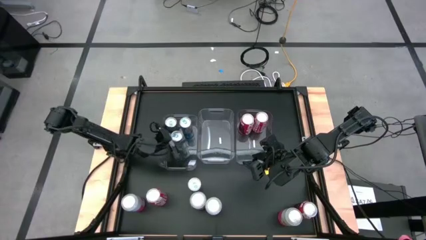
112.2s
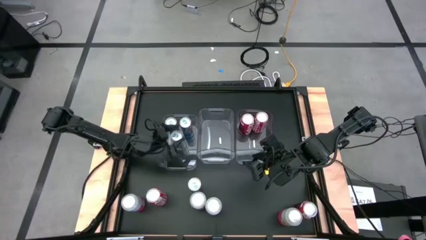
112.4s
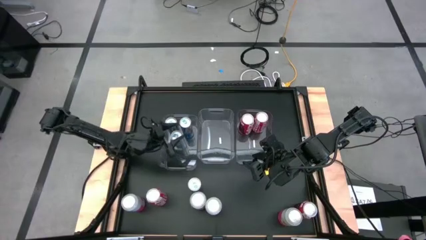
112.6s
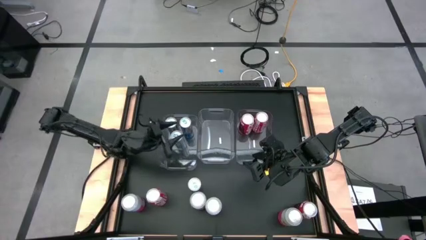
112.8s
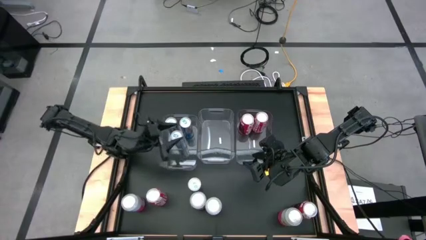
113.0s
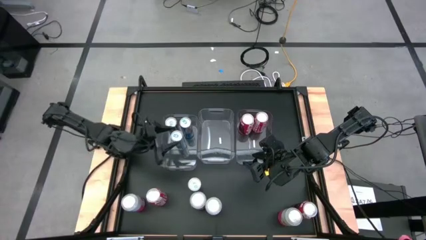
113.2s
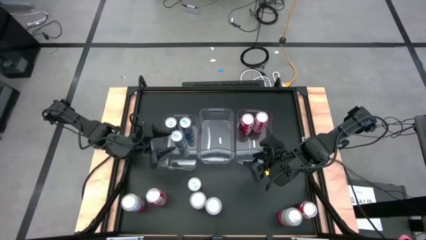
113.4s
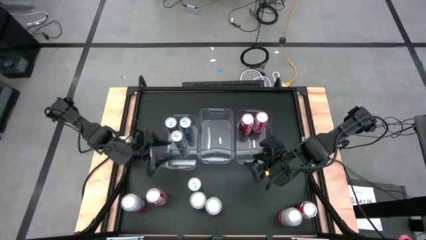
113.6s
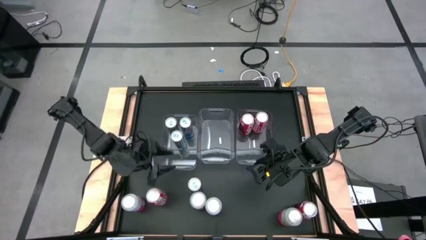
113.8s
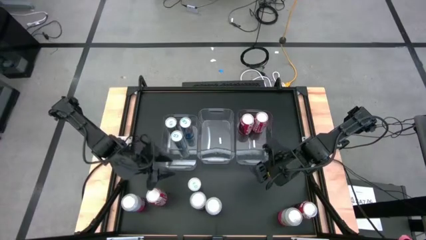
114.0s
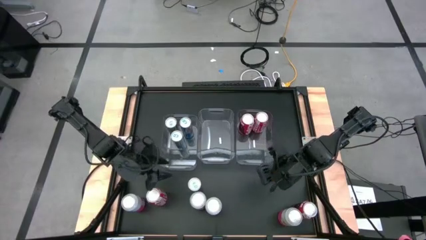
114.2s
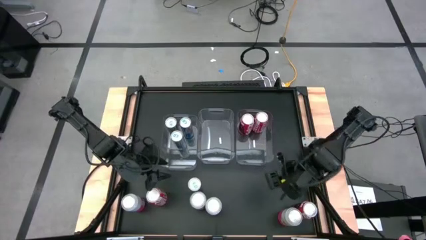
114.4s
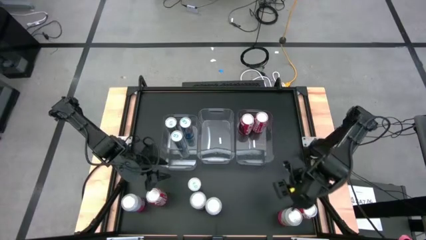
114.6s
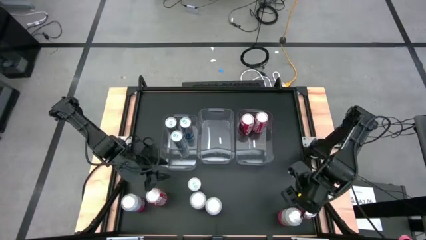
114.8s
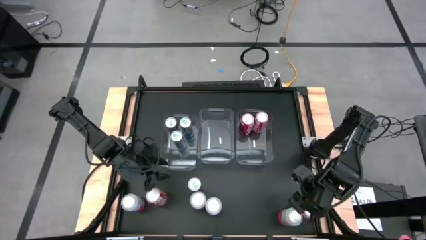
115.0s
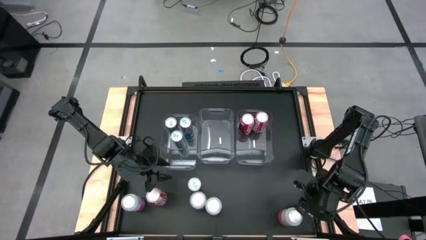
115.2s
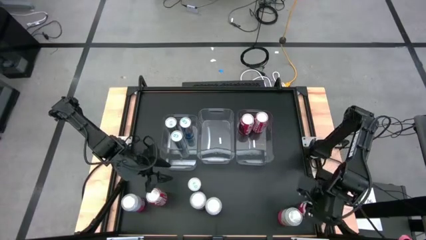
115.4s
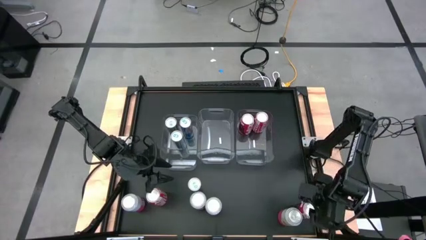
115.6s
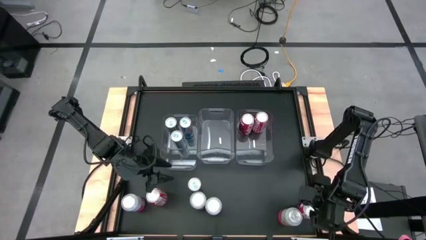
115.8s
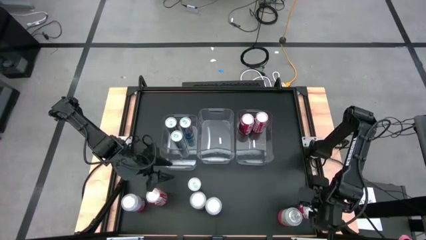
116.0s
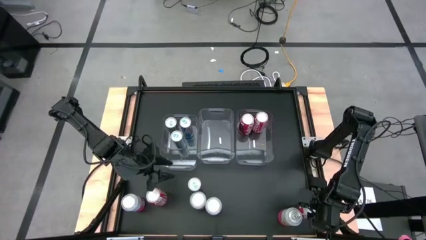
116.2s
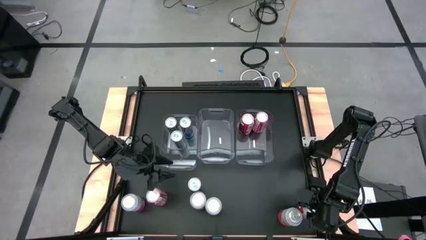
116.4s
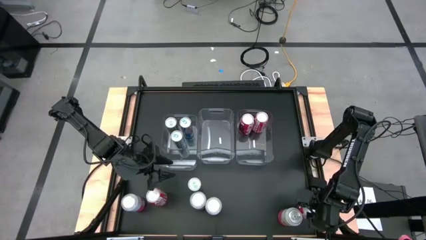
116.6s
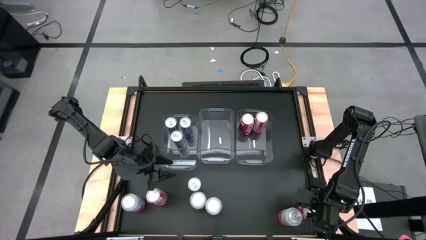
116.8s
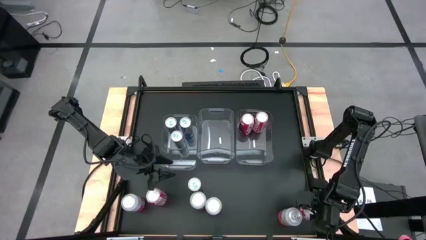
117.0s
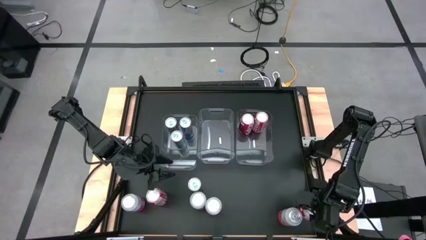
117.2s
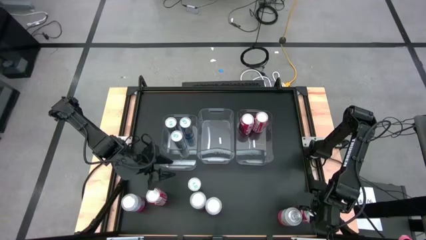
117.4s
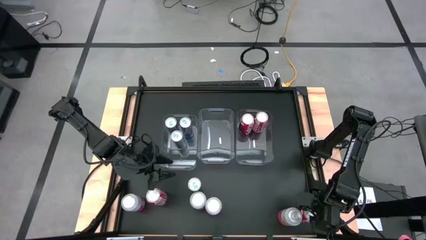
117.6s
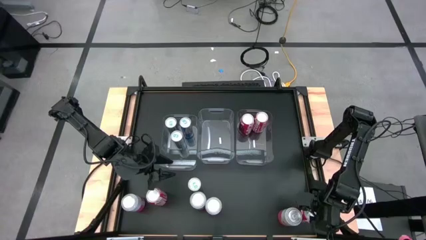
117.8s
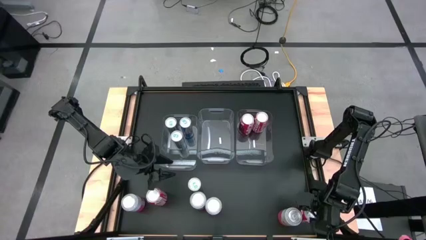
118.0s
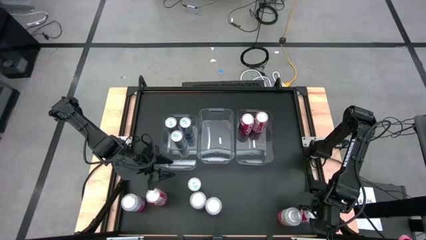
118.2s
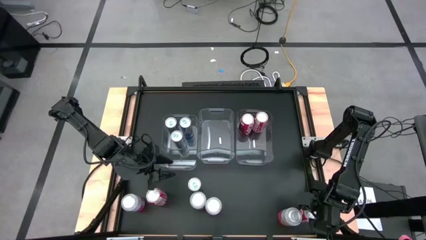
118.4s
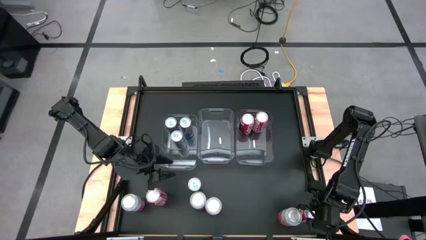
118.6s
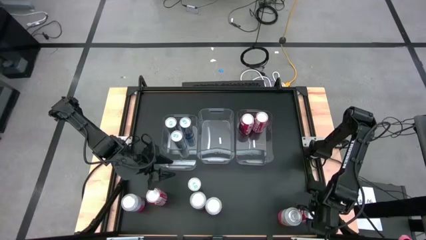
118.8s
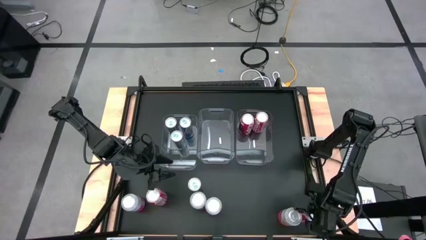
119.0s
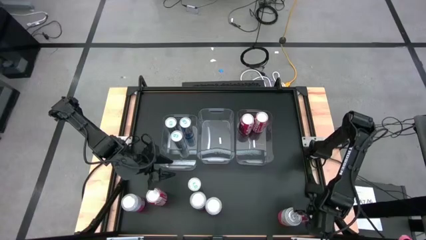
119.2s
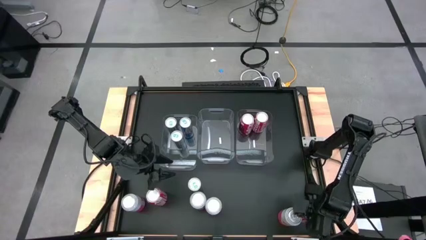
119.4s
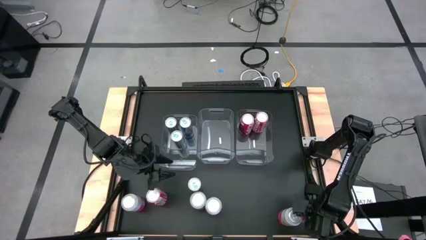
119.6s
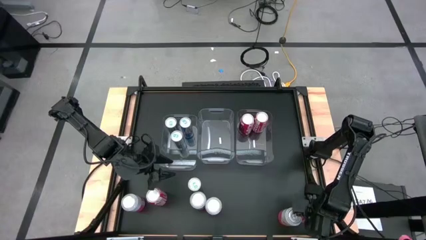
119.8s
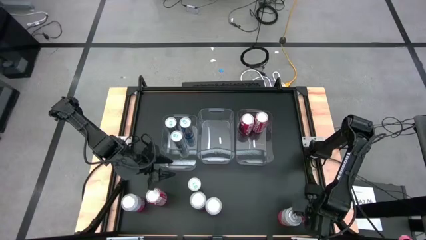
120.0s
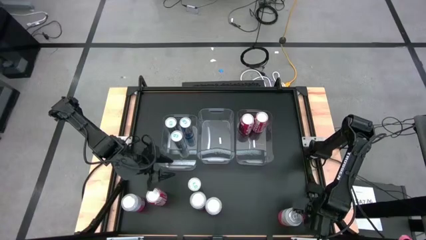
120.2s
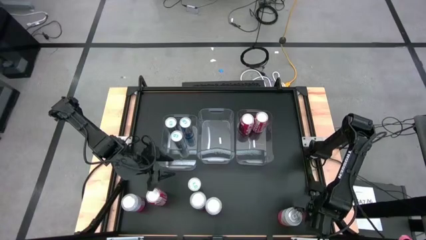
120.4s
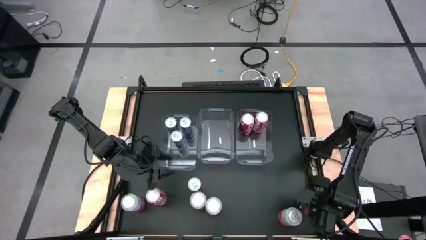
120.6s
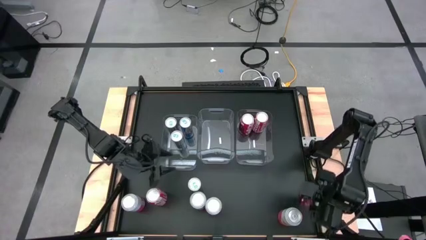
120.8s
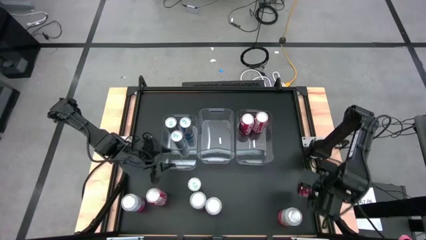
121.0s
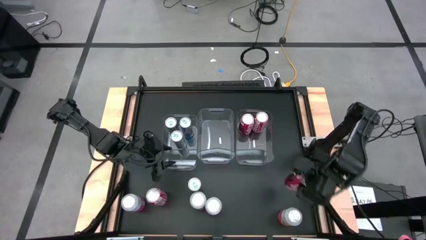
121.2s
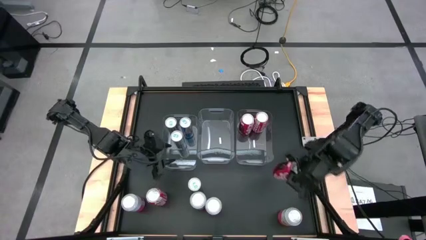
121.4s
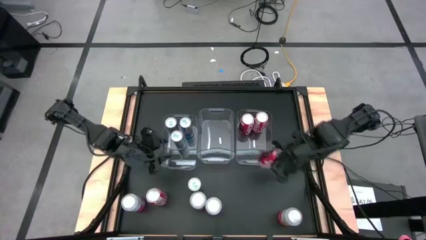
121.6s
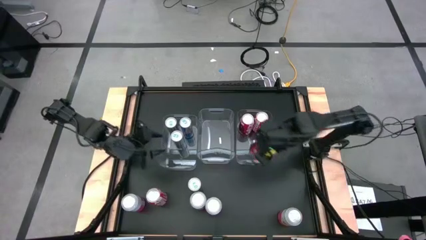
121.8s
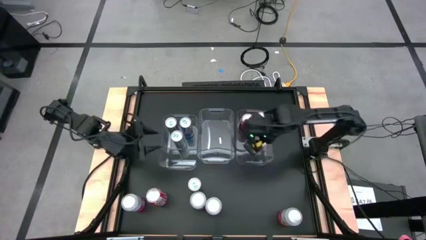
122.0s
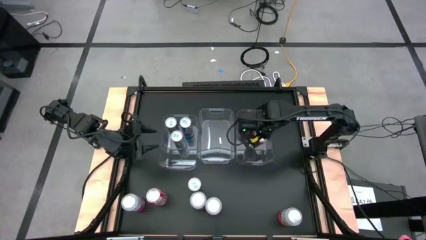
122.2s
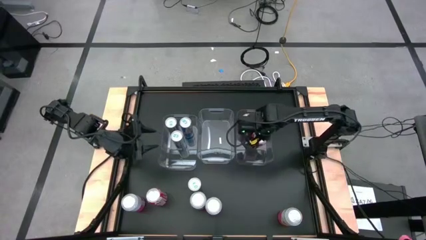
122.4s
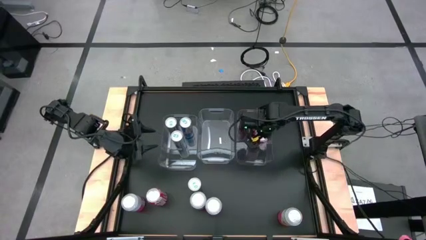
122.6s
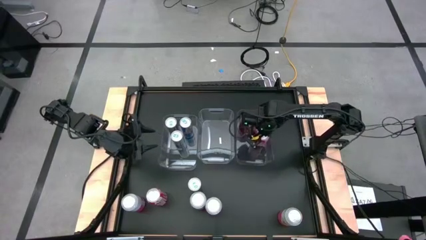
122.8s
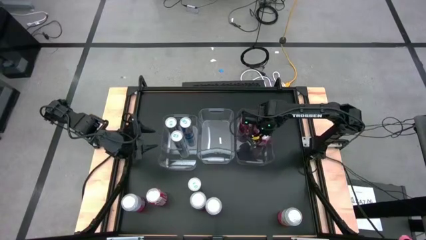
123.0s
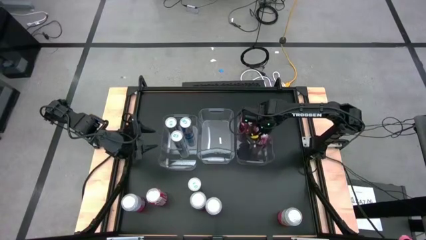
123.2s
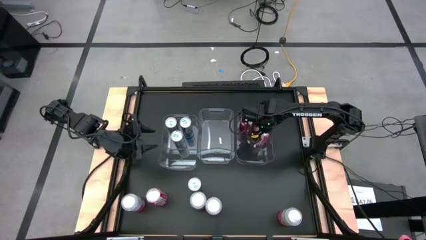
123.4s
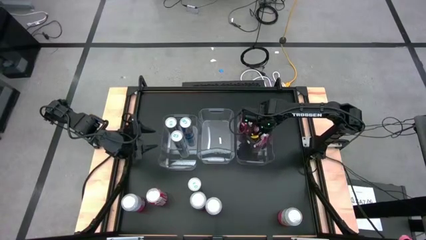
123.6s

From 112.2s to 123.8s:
Task: Sort soda cans
Put the bottom right red soda can into the right transparent bin

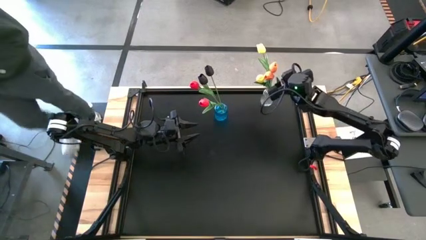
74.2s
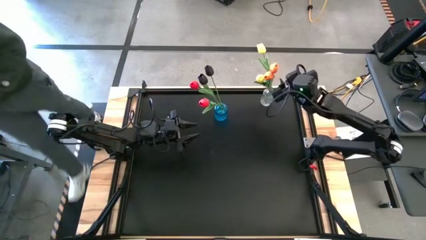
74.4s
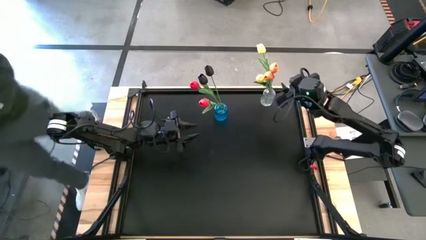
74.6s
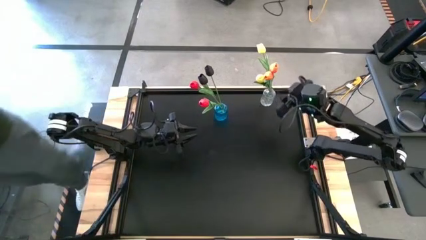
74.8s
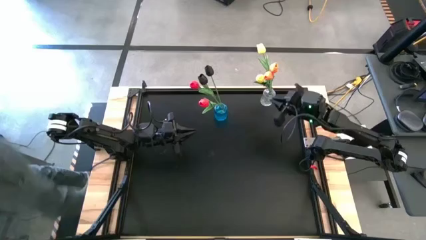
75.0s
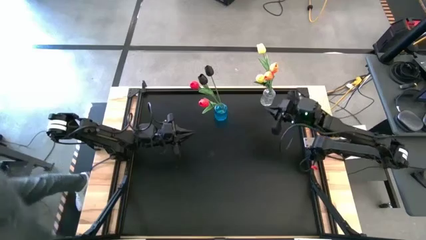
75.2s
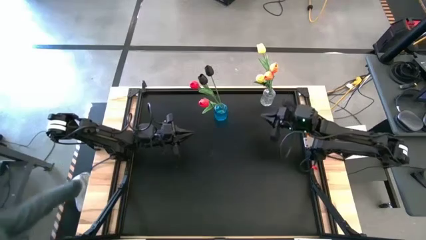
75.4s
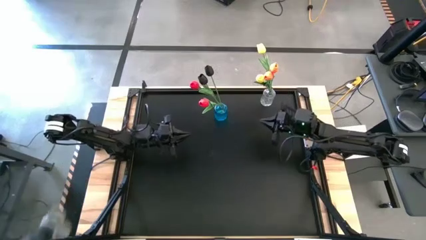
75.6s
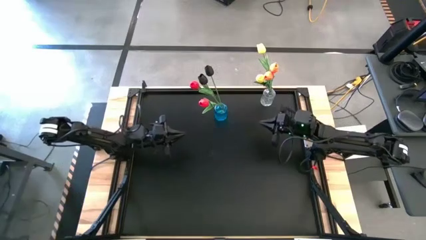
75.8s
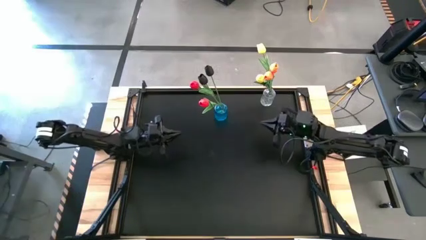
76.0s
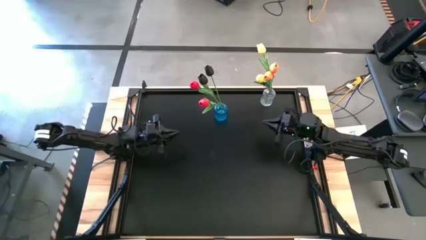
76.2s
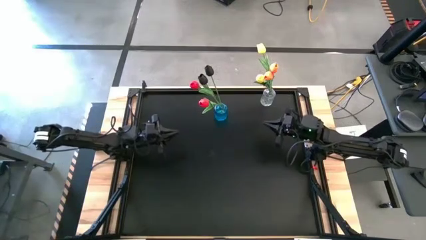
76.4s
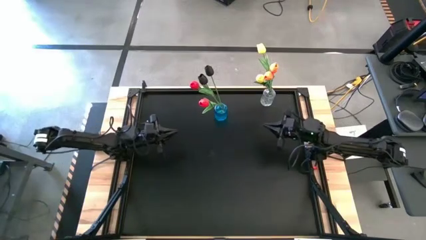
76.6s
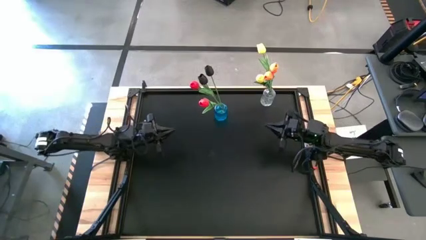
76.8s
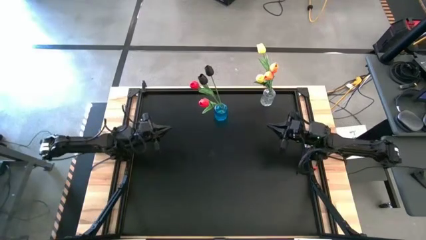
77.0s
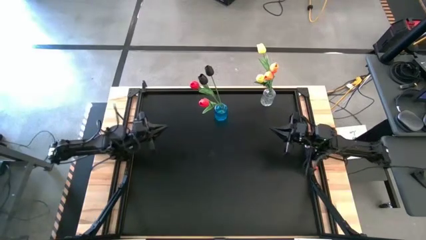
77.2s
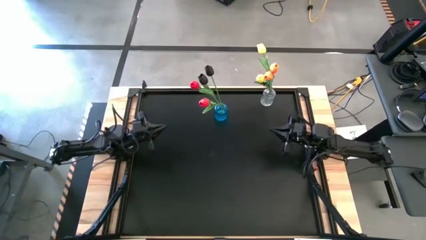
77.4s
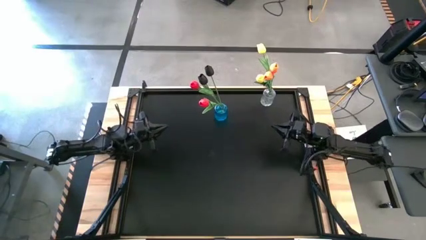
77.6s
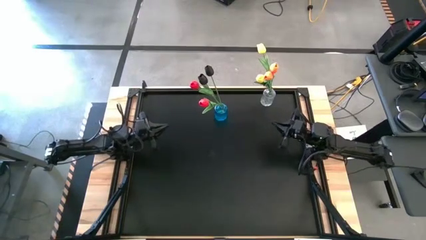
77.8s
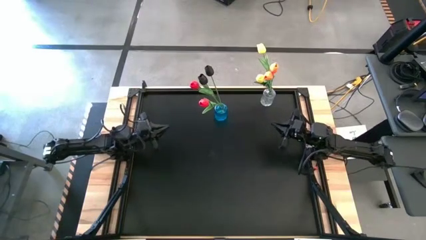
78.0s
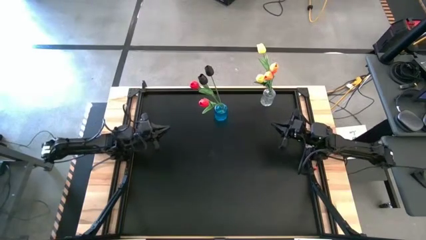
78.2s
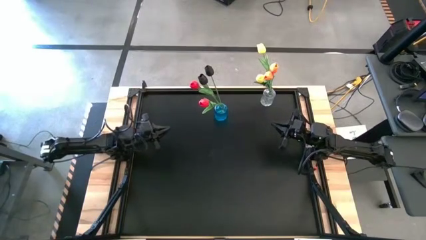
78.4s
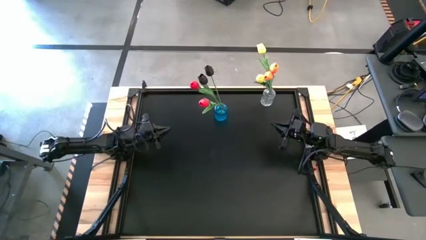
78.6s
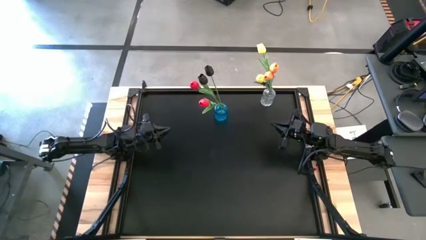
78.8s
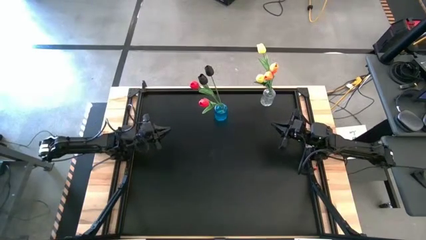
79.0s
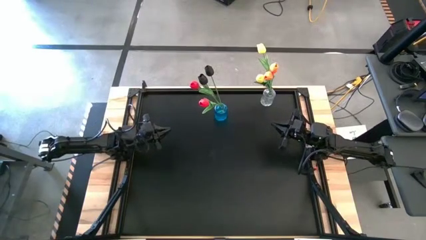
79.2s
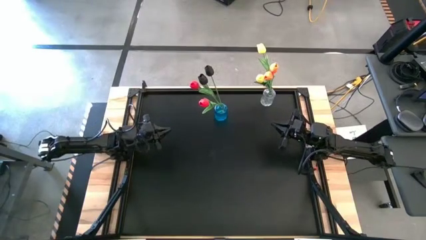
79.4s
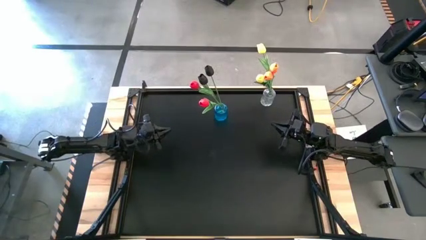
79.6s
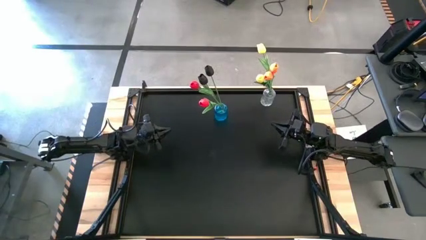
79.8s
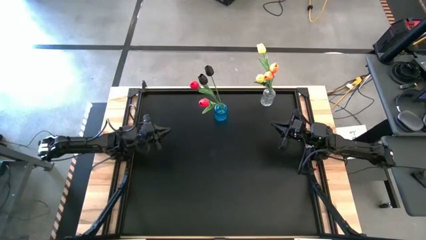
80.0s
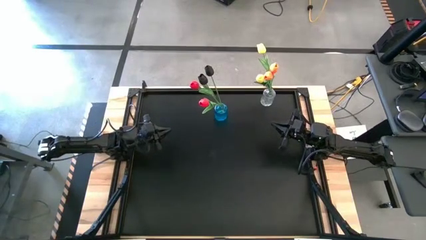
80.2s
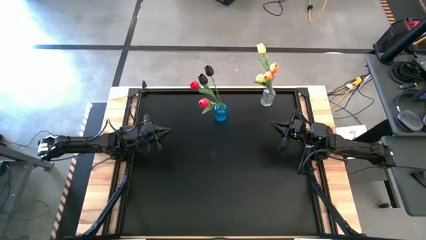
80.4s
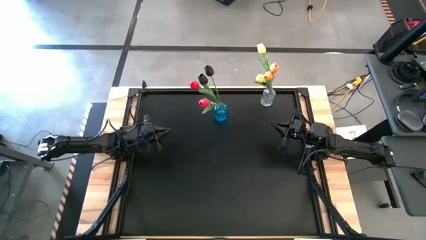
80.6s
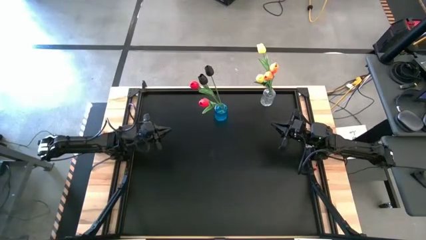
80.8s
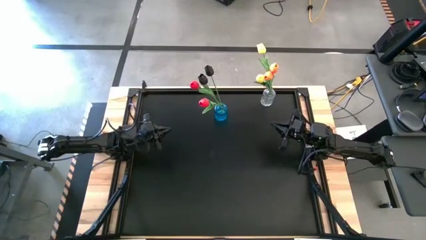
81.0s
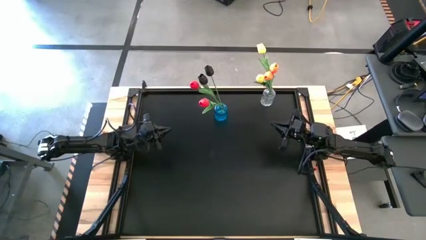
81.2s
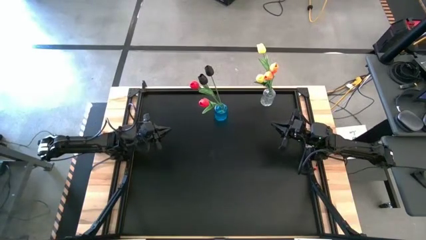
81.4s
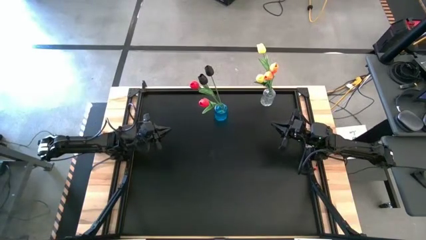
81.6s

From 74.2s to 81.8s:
Task: Sort flowers into vase by color
Return to Home Position
